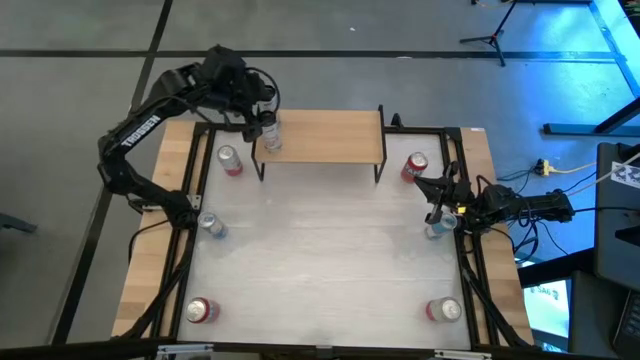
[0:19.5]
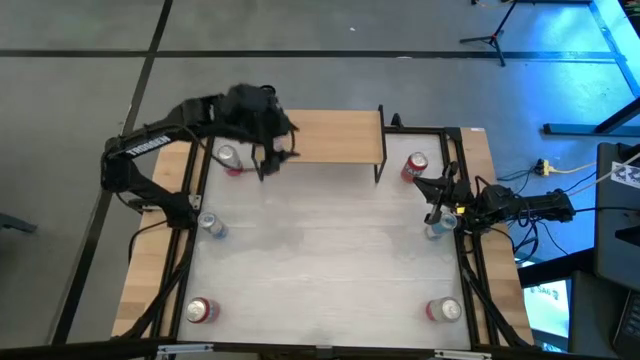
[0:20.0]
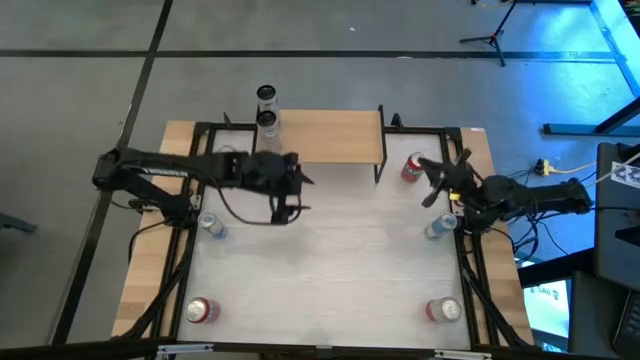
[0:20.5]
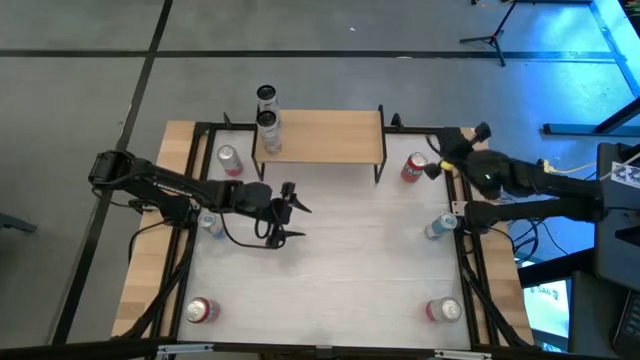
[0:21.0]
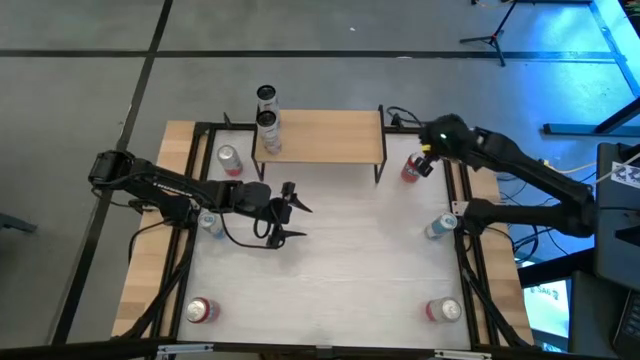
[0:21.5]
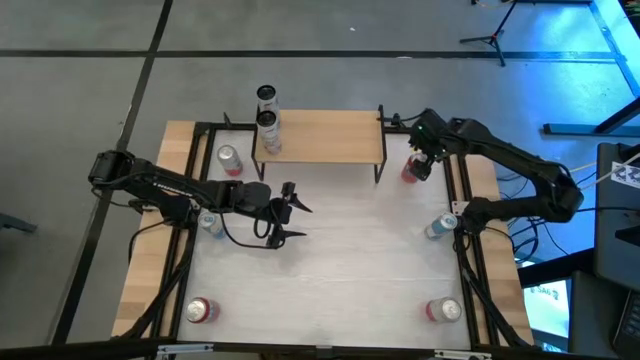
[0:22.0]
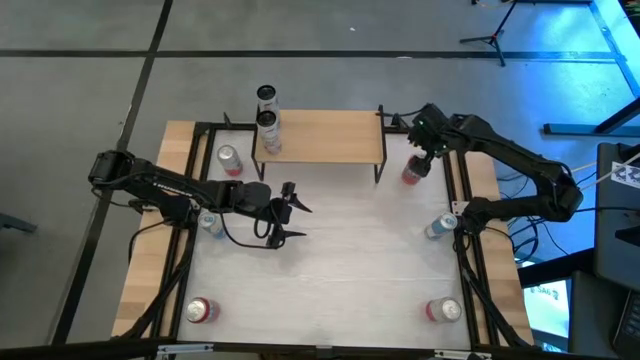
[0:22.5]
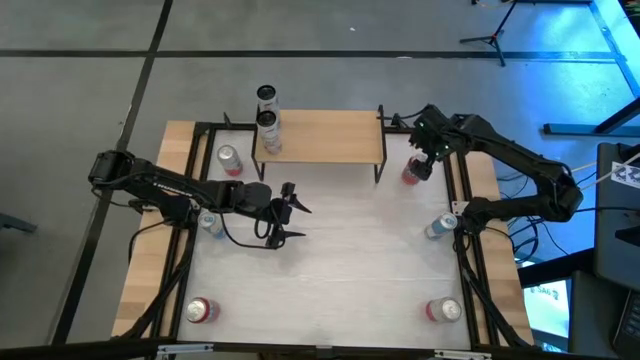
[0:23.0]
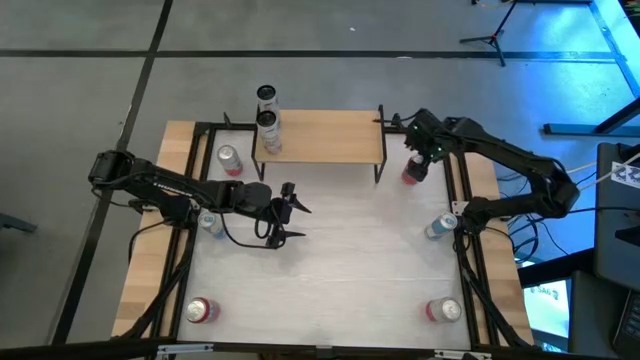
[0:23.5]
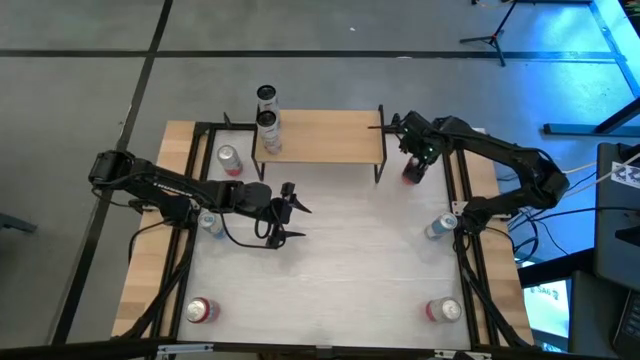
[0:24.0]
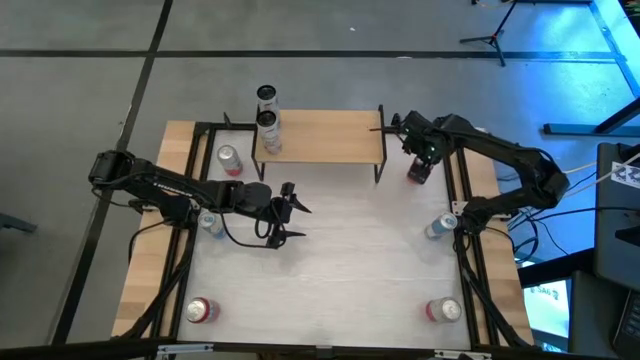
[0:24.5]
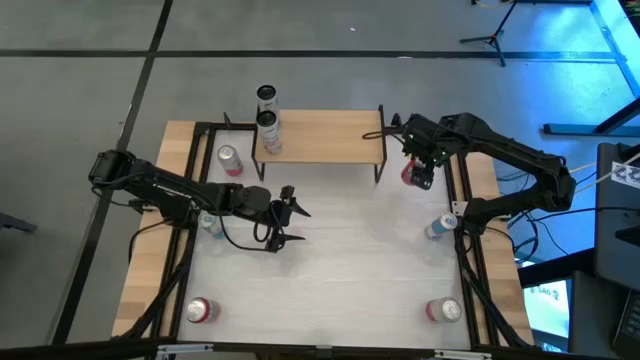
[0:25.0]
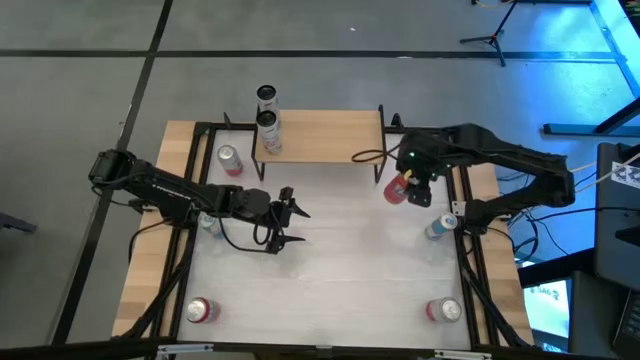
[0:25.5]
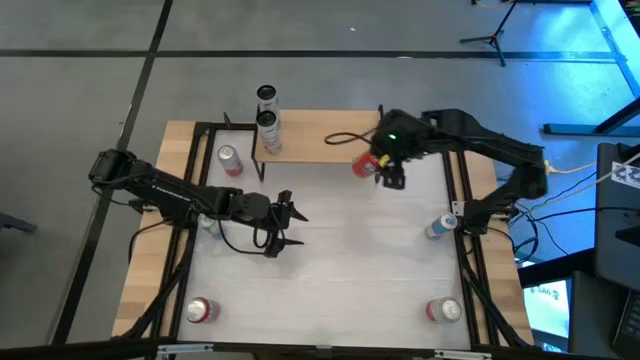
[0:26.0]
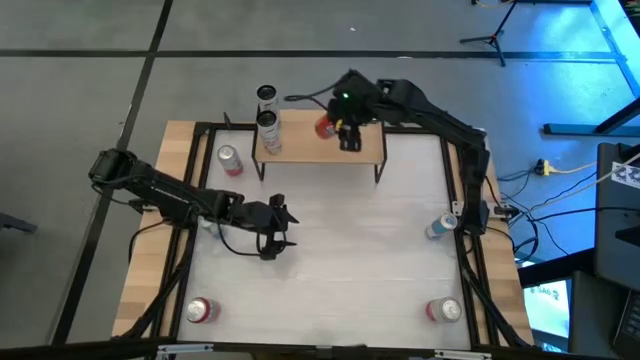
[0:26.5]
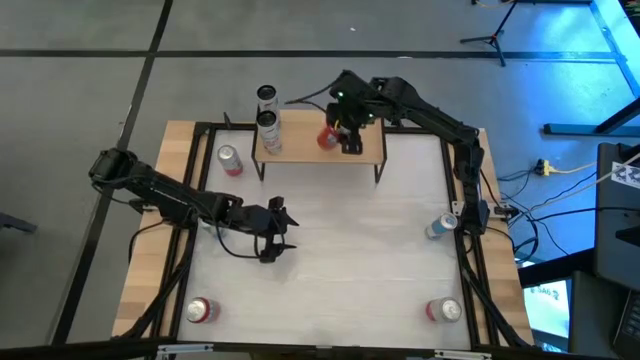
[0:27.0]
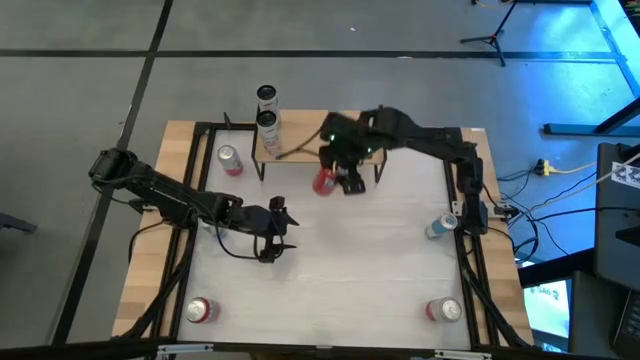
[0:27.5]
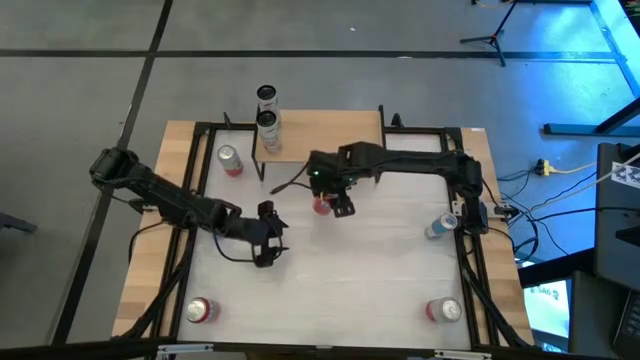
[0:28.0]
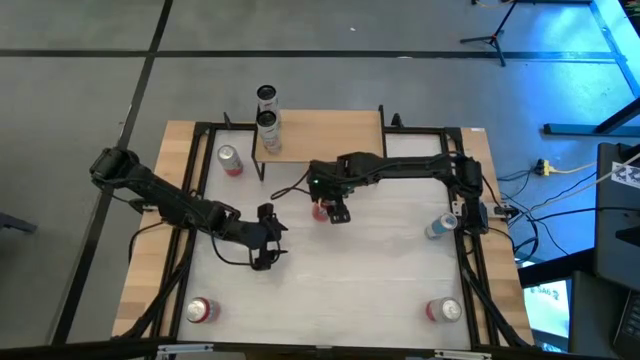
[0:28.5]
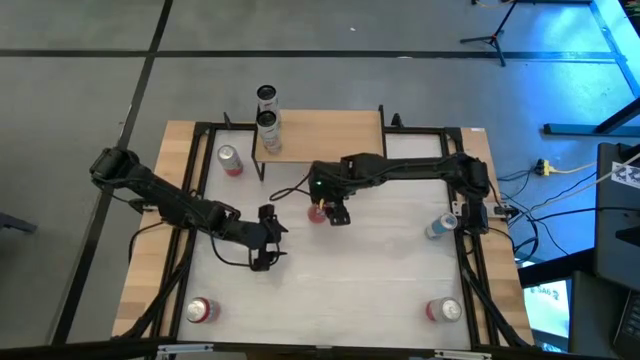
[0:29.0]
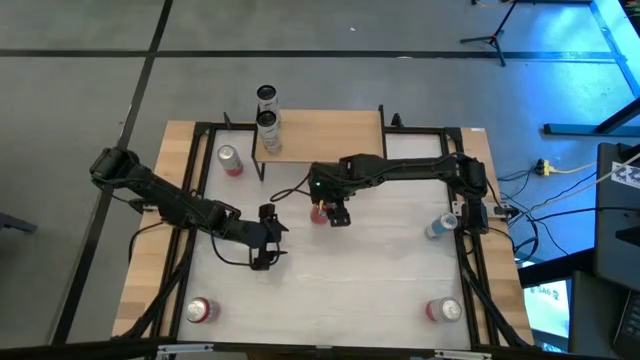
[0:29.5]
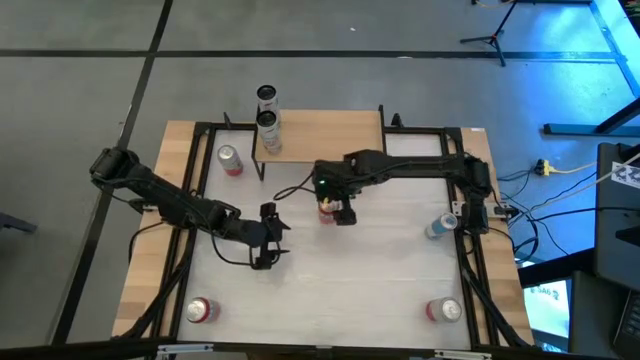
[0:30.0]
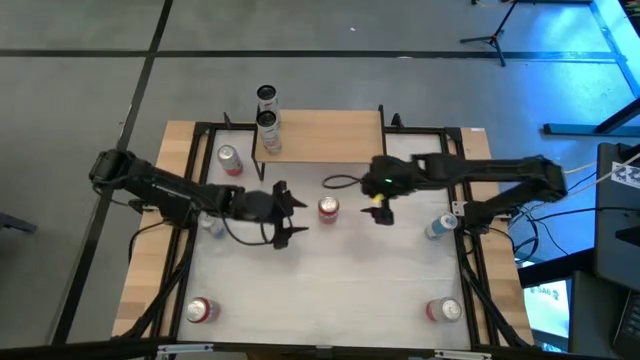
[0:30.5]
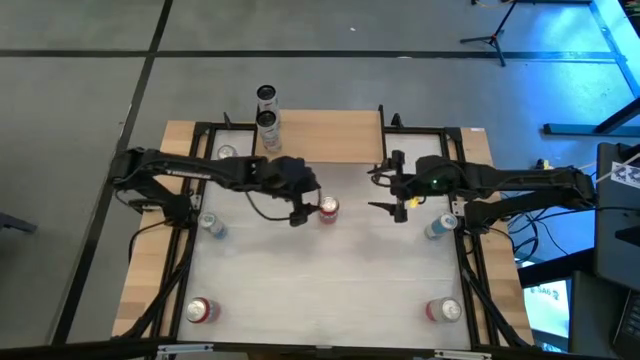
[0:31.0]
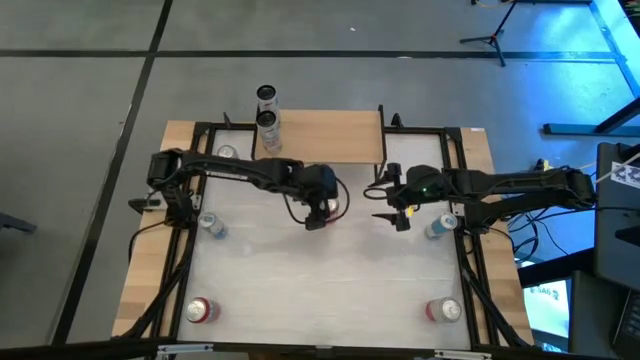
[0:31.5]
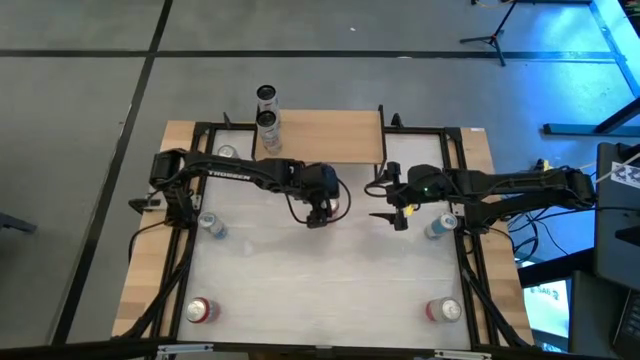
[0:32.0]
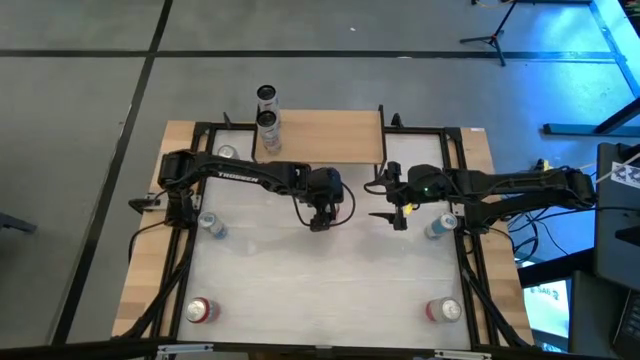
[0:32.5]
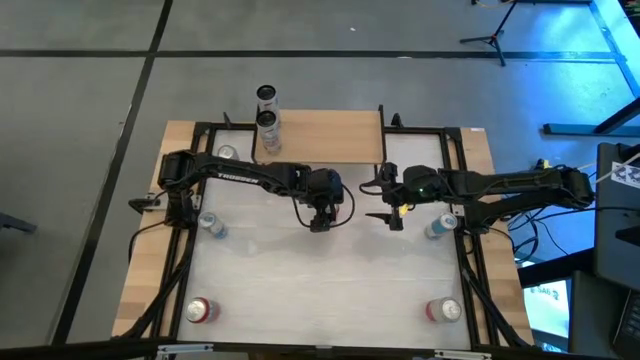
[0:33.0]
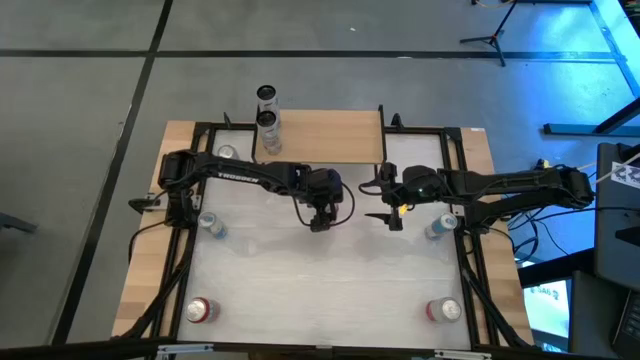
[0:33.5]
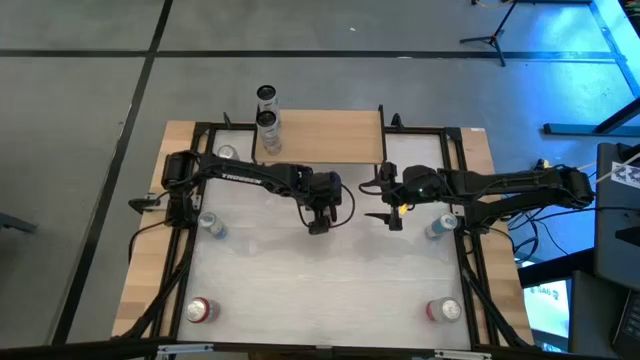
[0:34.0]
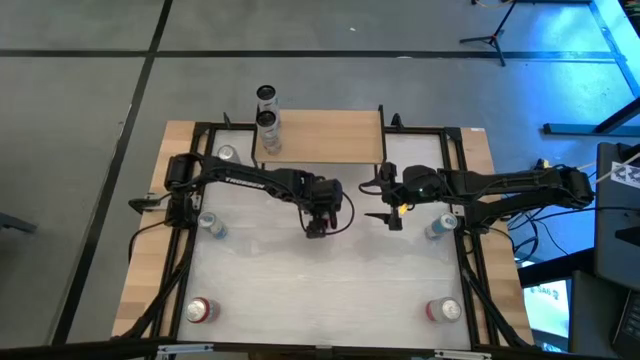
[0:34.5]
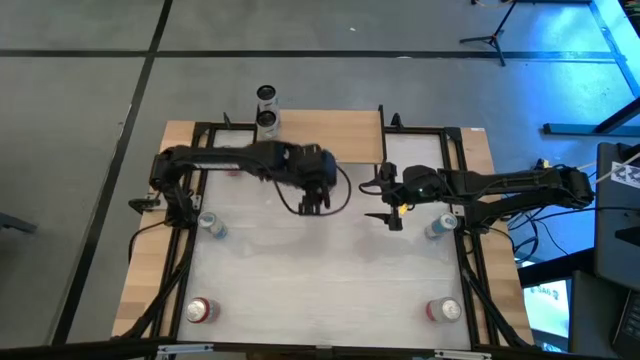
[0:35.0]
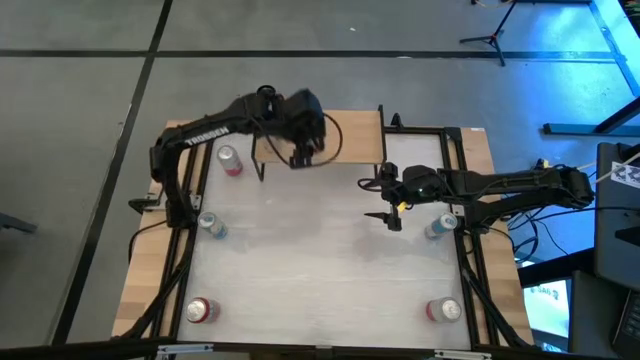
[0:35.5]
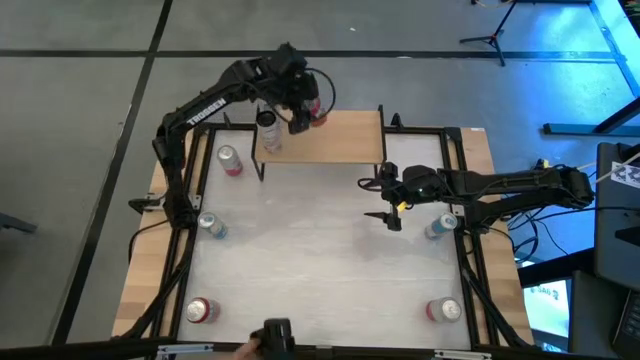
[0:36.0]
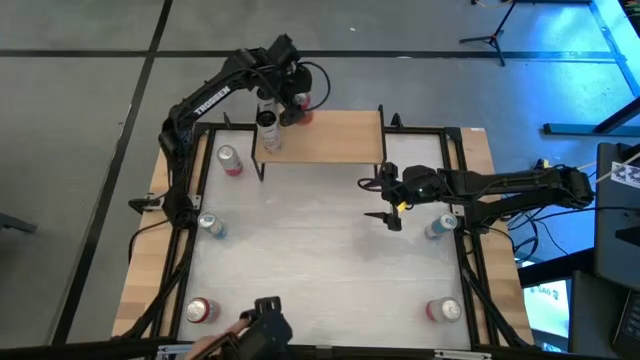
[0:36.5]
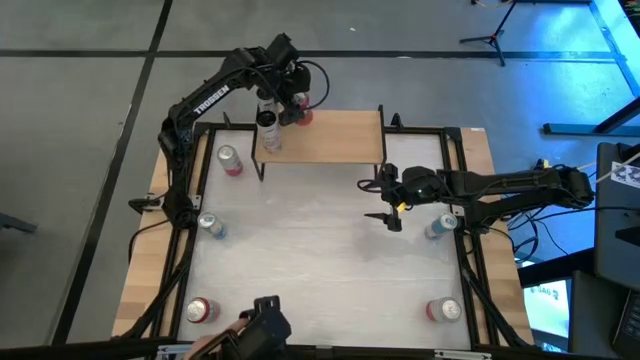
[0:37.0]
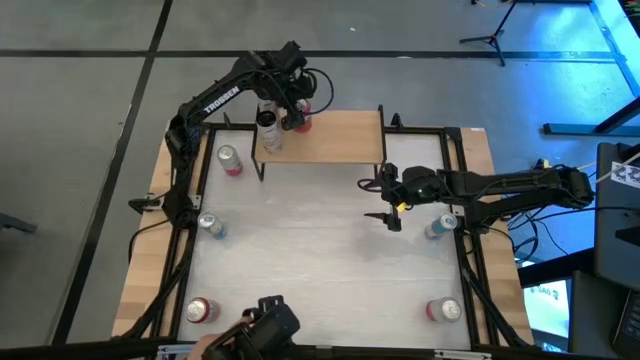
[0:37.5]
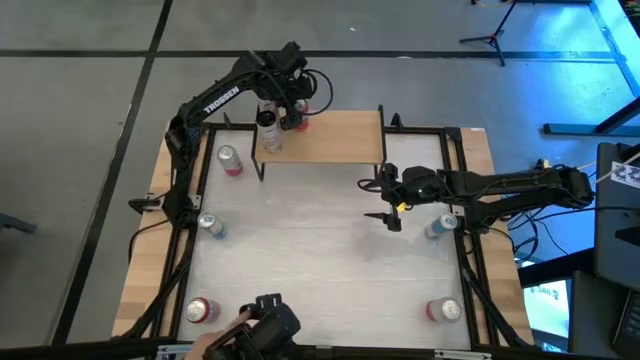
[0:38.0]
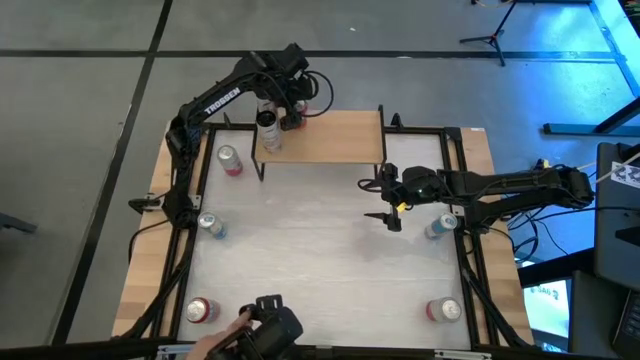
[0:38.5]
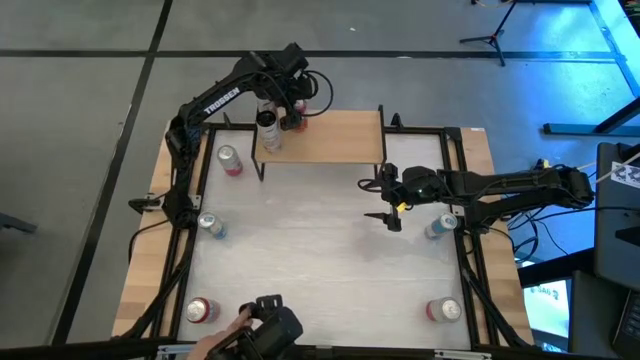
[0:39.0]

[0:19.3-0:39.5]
Task: Place canned beverage on shelf
Put the right orange soda can on the shelf

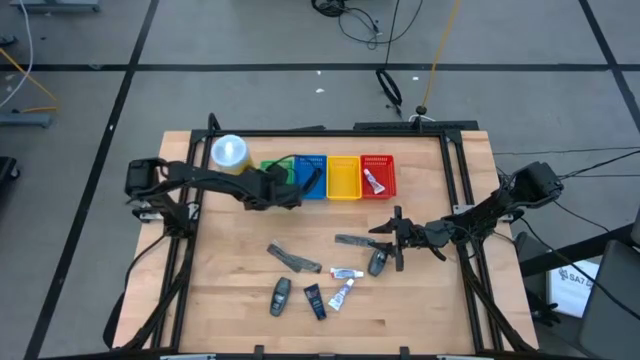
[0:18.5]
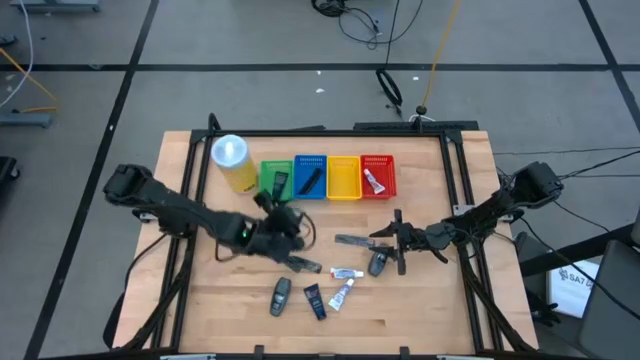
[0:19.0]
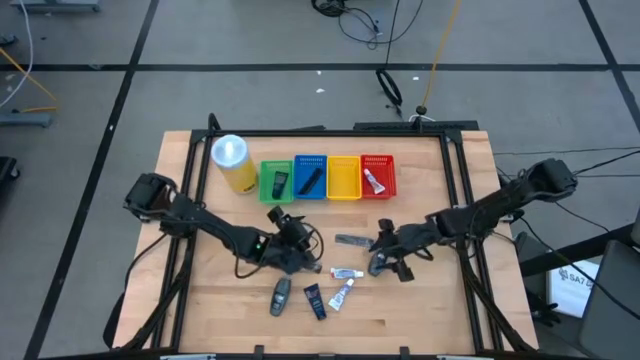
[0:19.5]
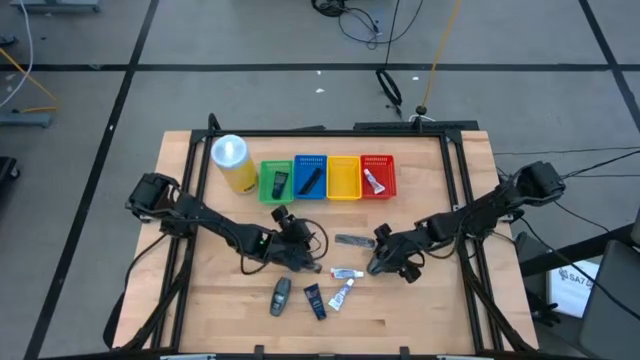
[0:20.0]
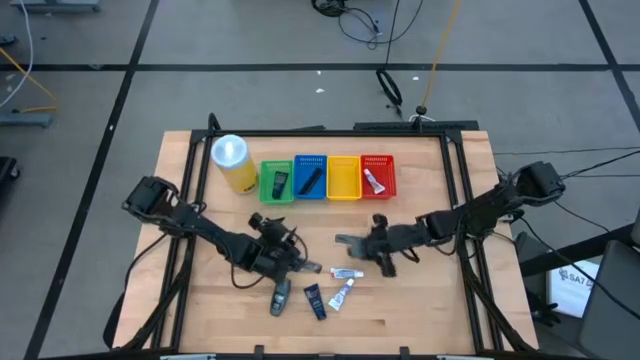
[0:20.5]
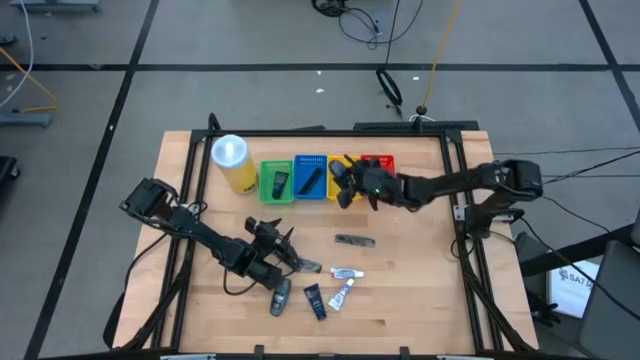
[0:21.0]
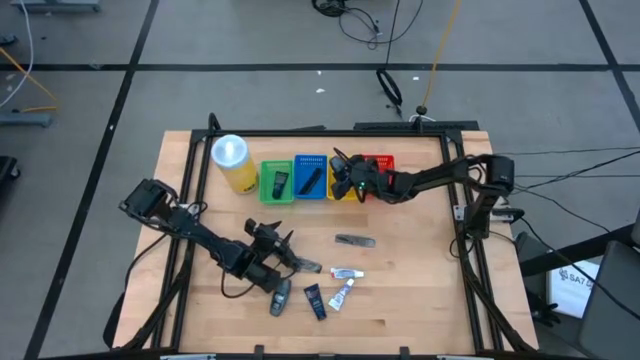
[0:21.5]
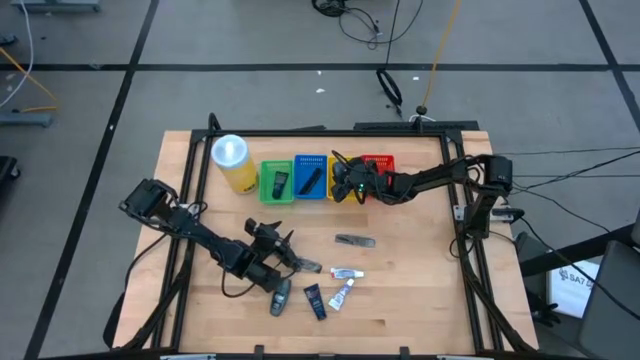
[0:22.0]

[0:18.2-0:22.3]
Task: Pick & Place Travel size toiletries
Put the deodorant into the yellow basket
